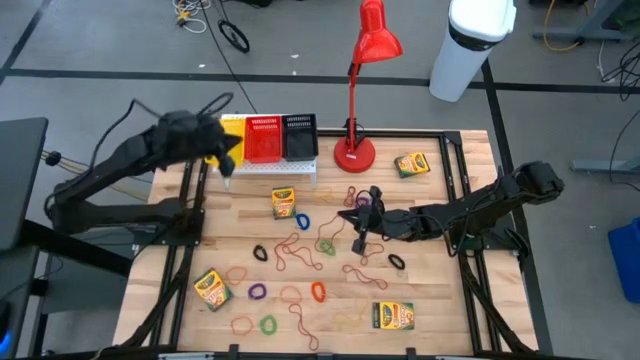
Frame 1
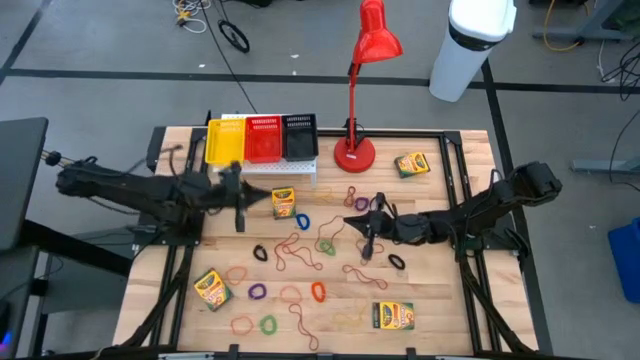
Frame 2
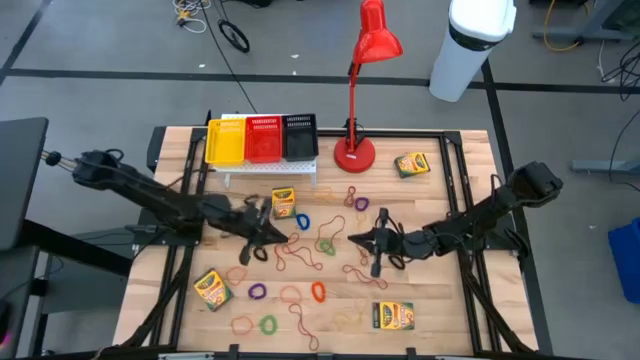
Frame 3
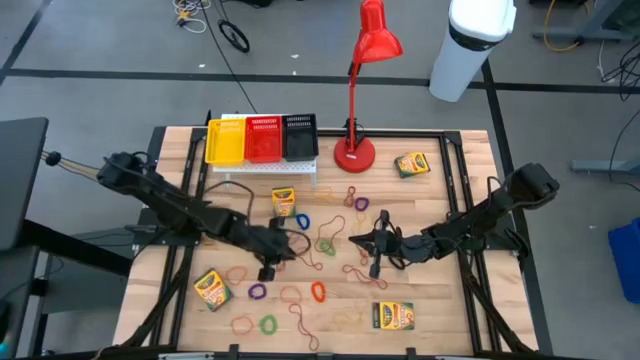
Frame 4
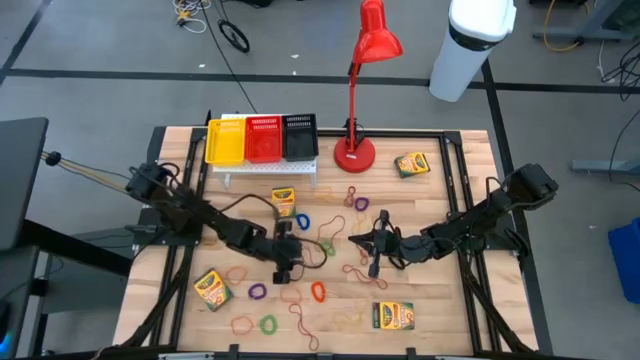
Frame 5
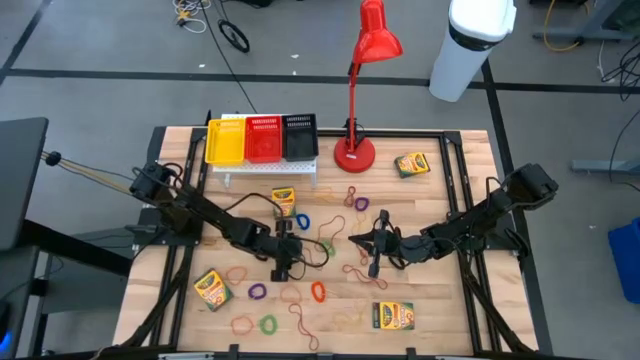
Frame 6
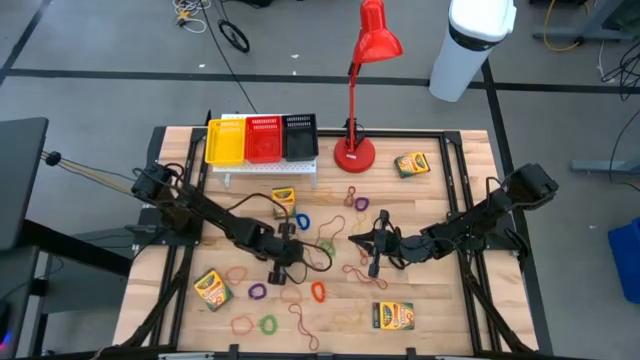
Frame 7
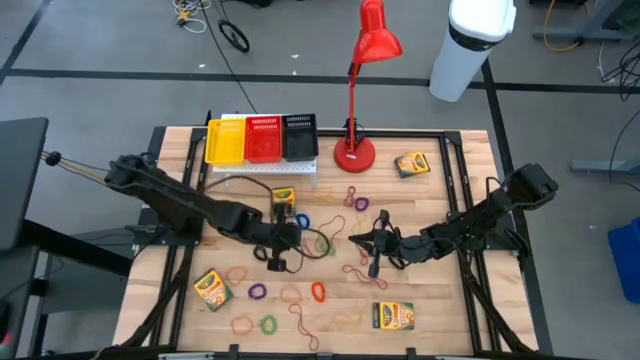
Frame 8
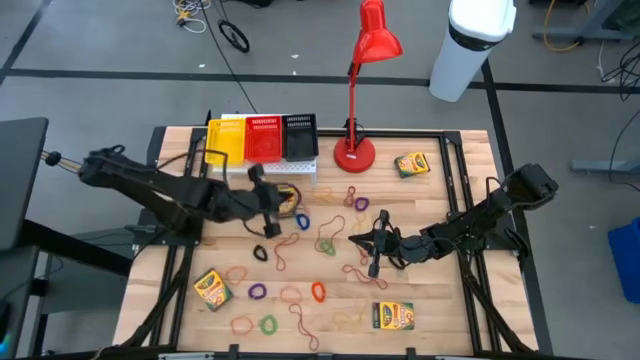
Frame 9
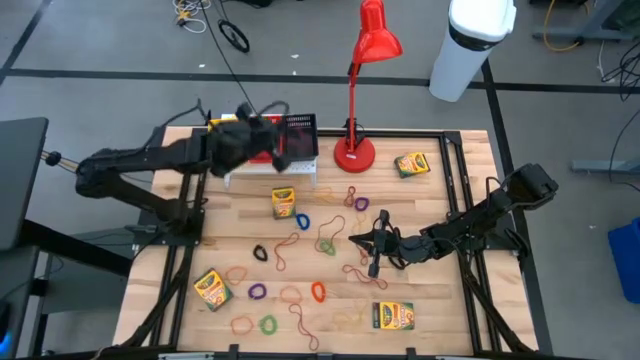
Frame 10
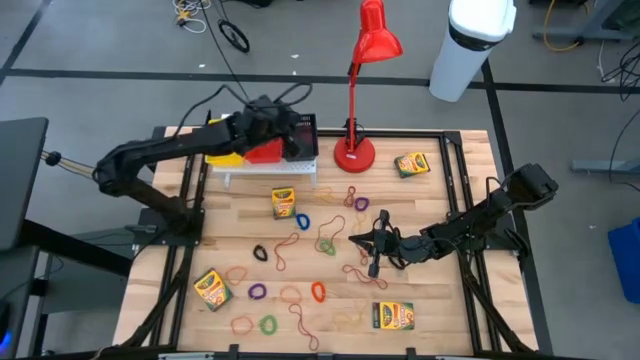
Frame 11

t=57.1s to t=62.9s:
Task: Pick & Place Office Desk Supplies
Put the red rubber band into the black bin on the shelf

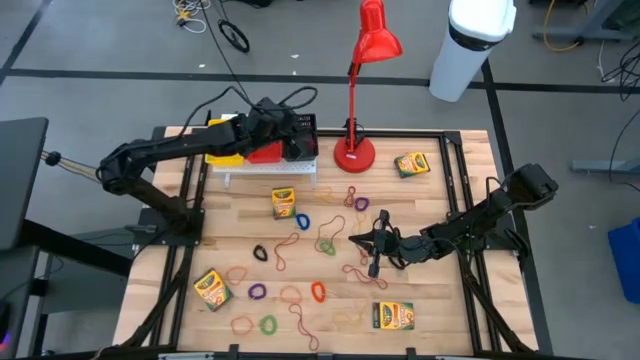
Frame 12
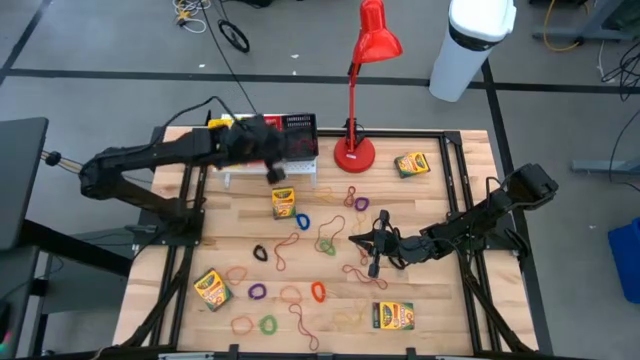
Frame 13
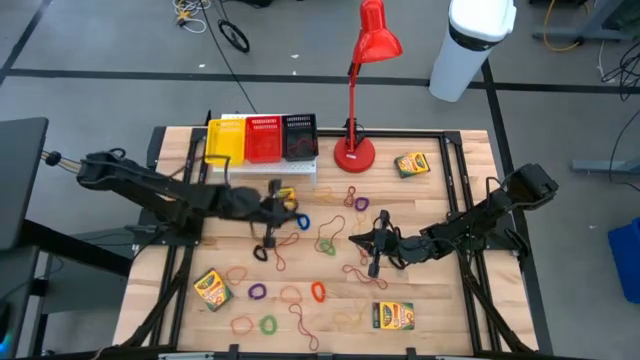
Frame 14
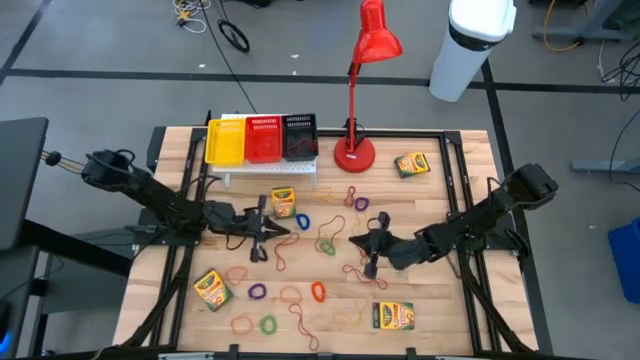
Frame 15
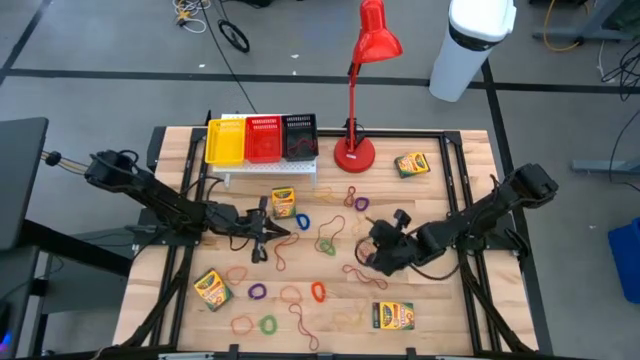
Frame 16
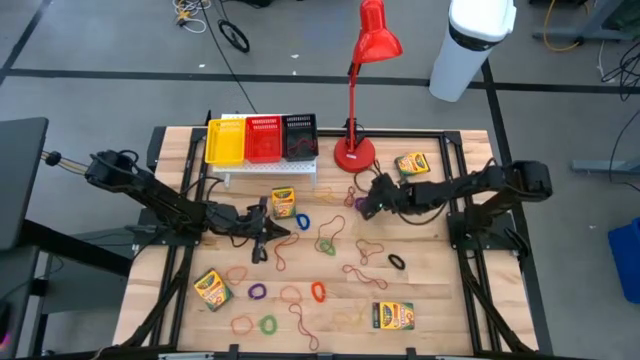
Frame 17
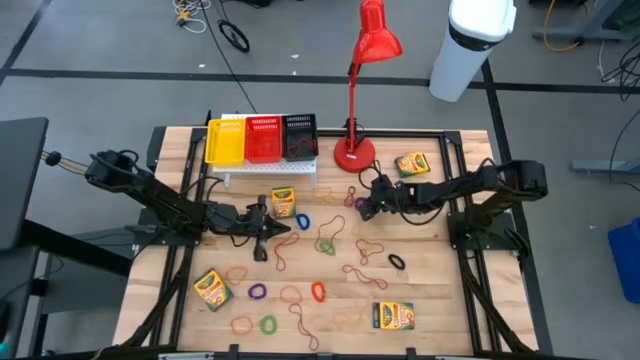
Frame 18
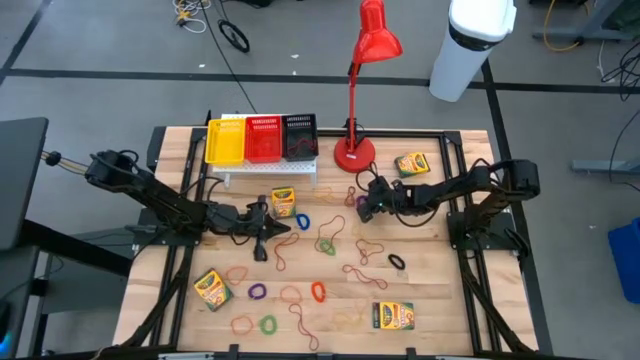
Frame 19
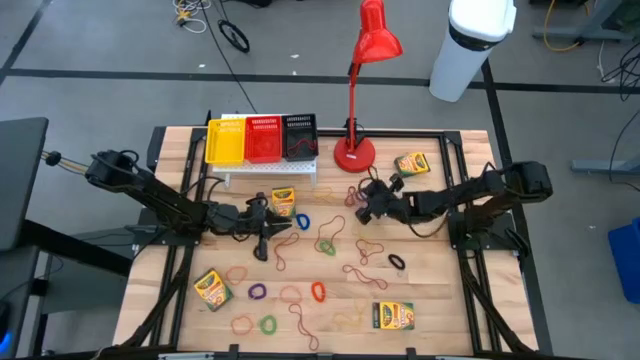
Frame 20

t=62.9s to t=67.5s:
Put the violet spring rubber band into the yellow bin on the shelf

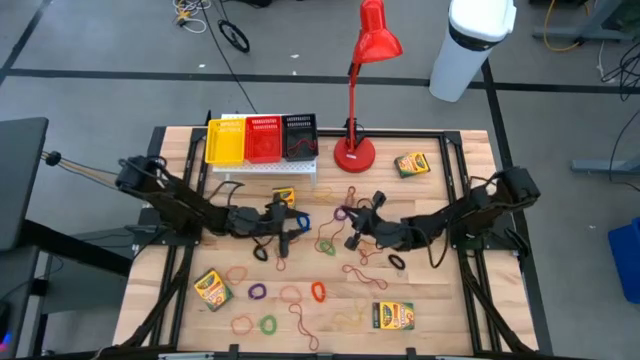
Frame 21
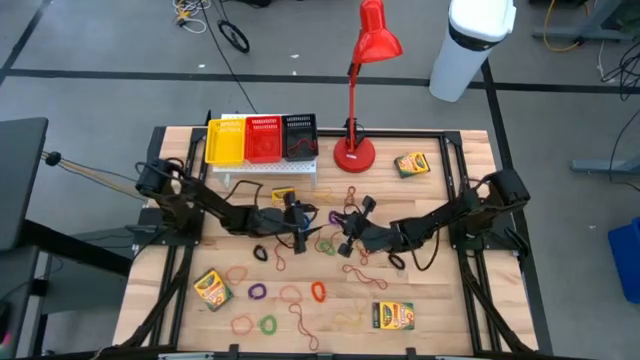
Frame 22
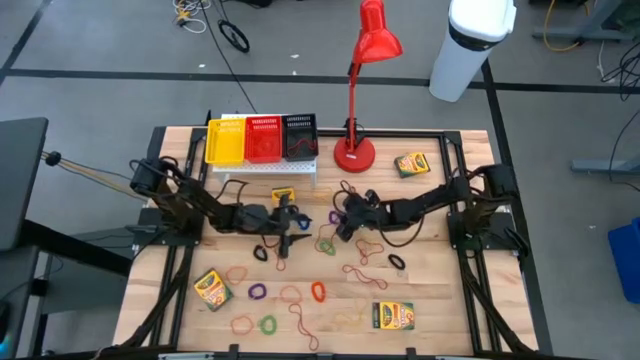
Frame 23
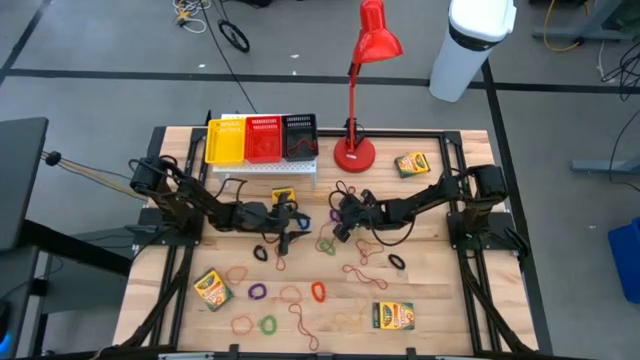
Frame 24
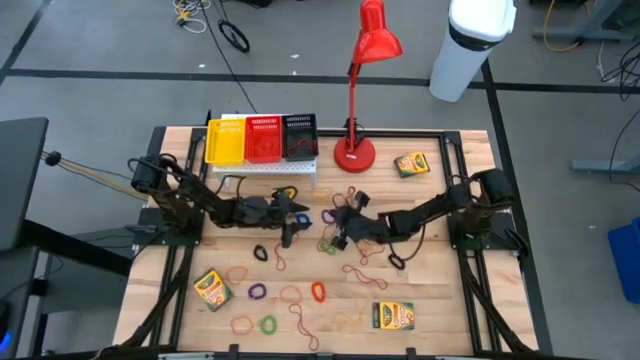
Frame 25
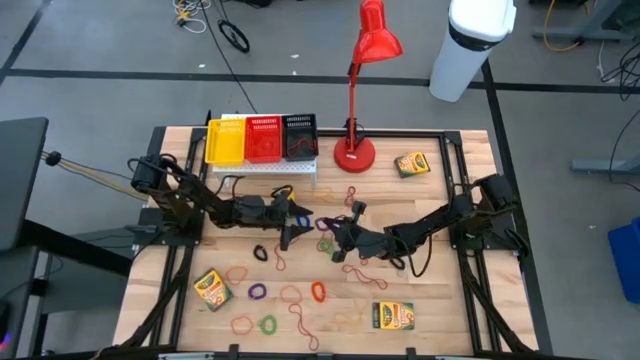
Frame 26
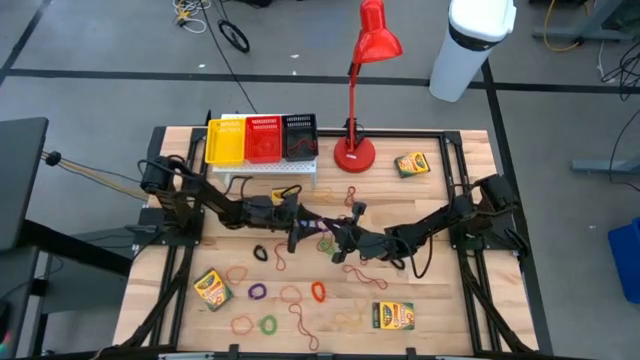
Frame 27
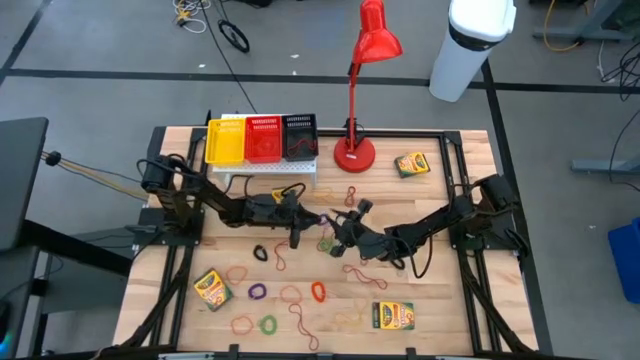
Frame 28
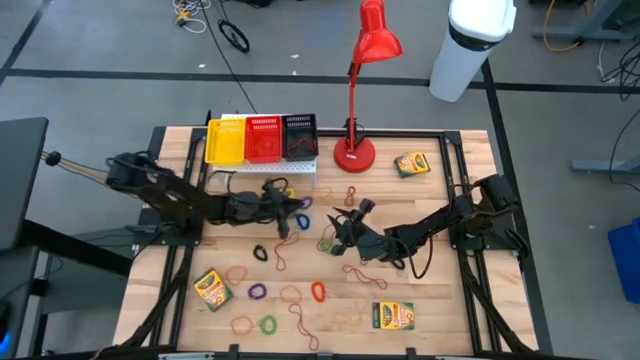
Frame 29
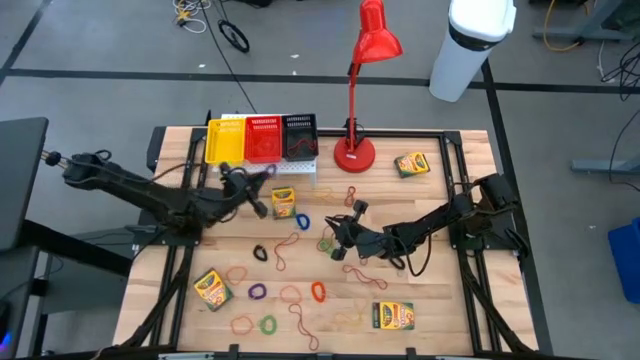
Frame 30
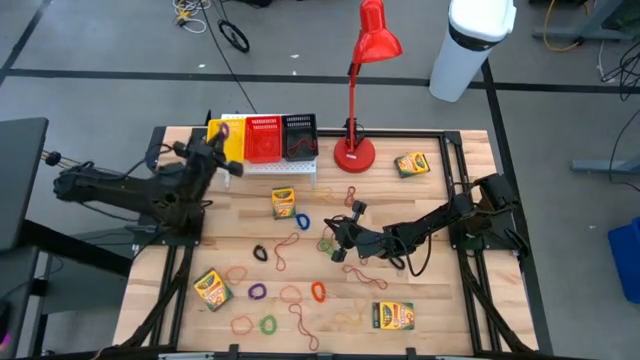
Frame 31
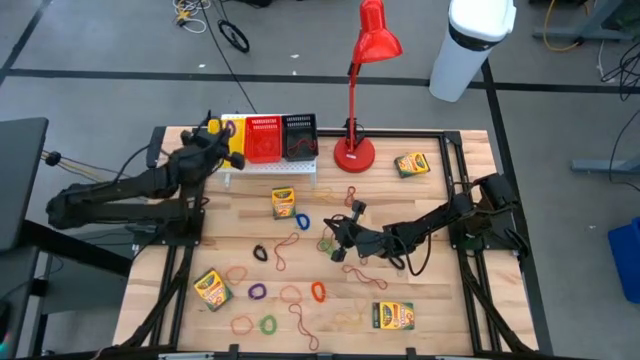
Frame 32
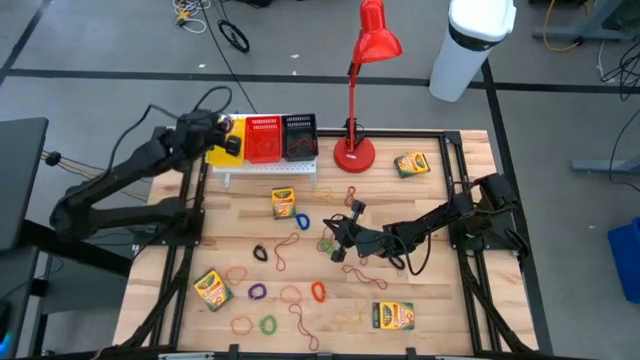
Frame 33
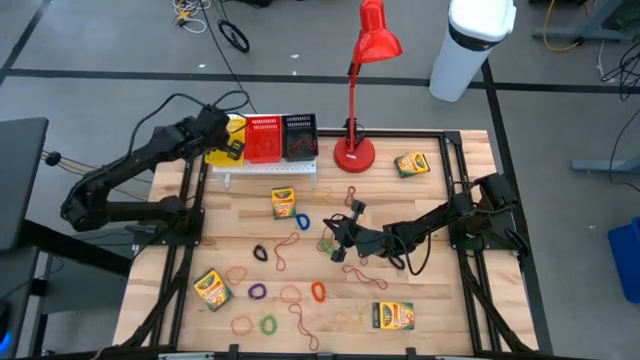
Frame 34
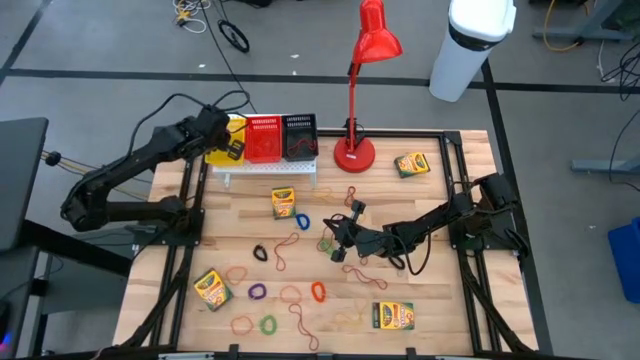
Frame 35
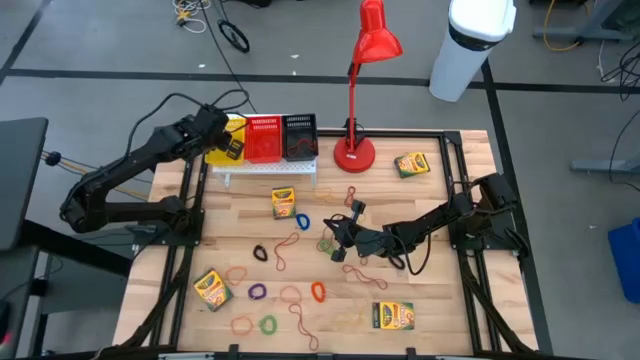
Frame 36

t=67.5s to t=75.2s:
Put the violet spring rubber band into the yellow bin on the shelf

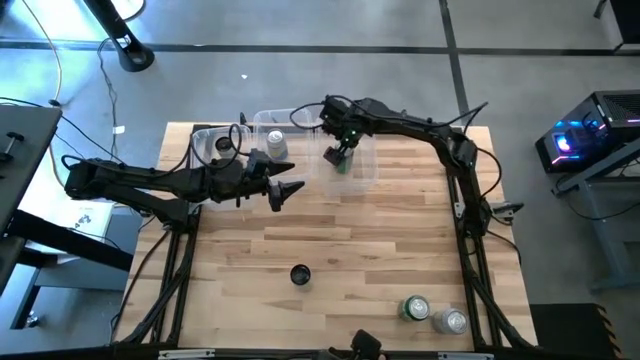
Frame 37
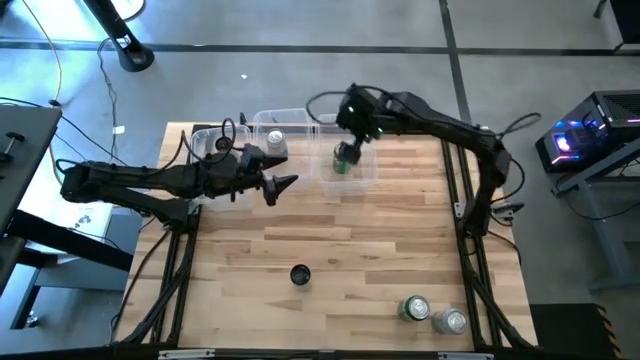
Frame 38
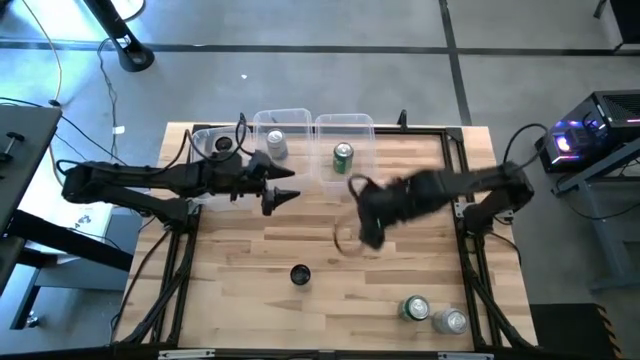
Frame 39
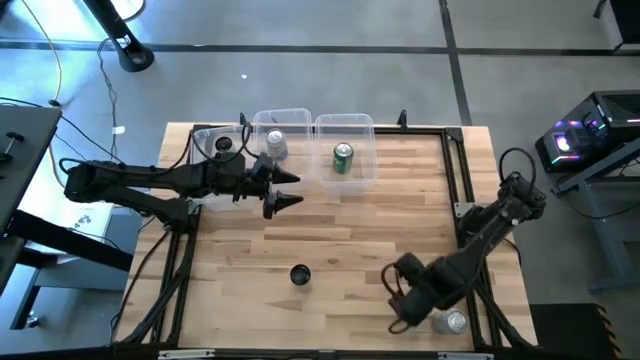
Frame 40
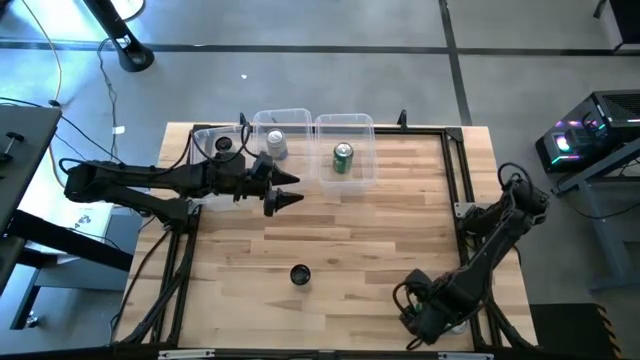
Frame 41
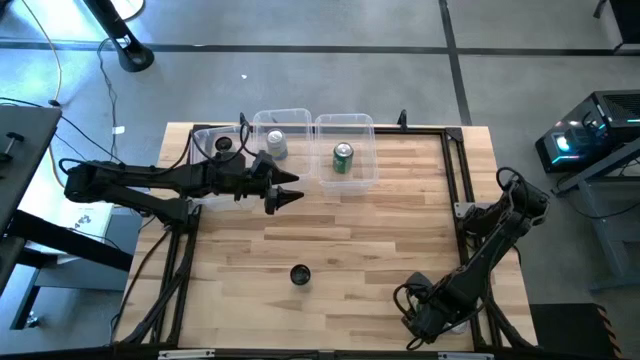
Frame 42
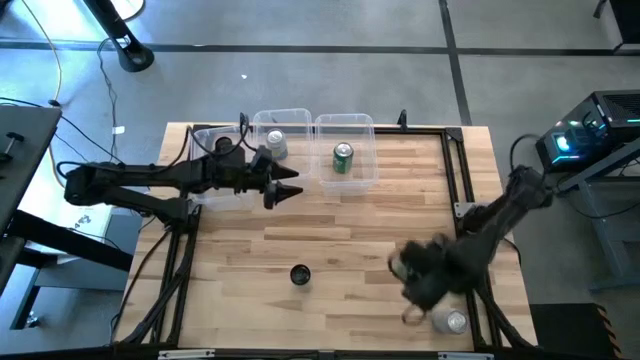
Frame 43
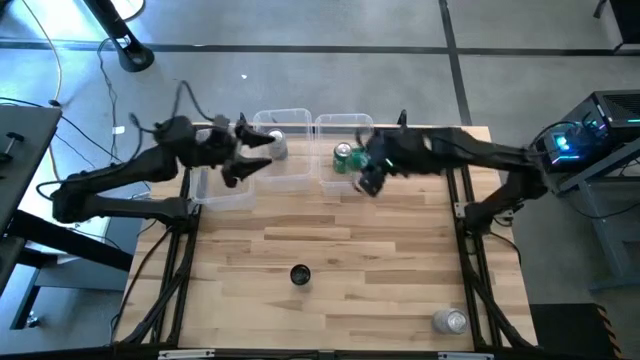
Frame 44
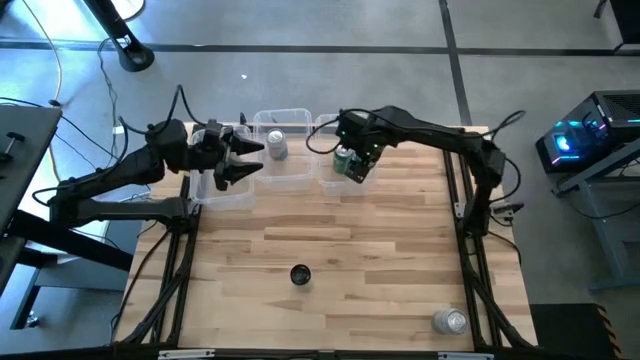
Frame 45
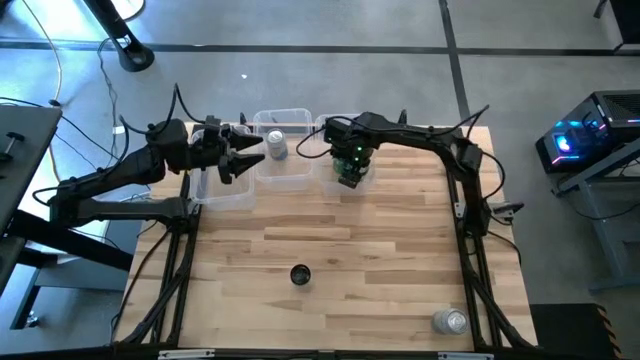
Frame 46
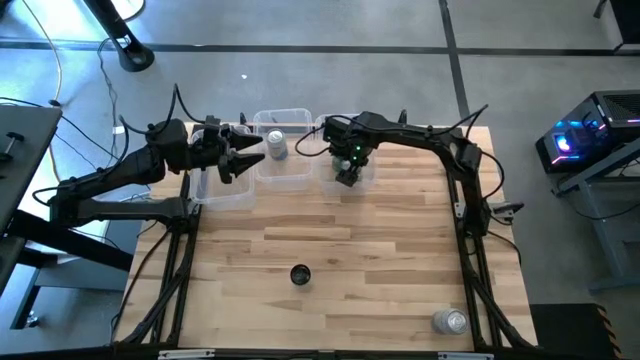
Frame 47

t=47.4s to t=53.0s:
Task: Sort soda cans
Put the green soda can into the right transparent bin
